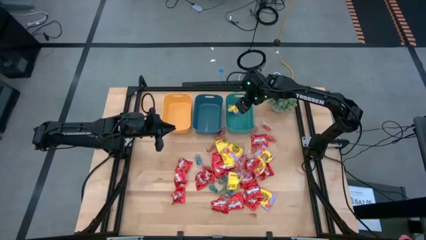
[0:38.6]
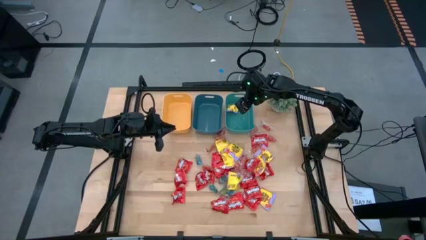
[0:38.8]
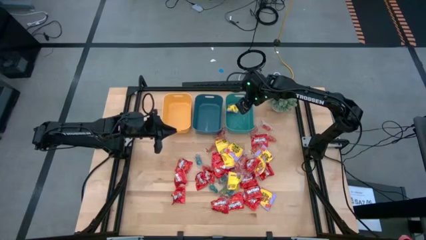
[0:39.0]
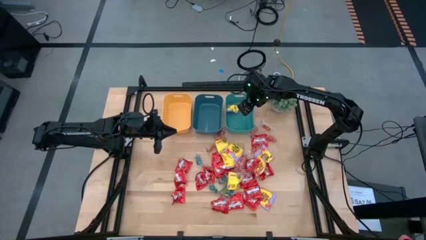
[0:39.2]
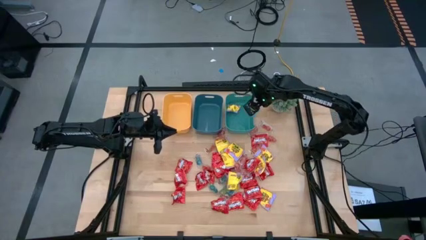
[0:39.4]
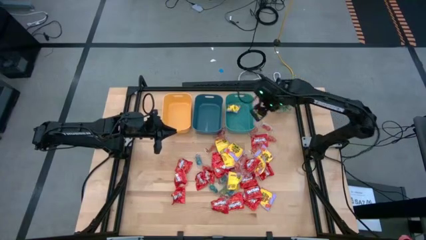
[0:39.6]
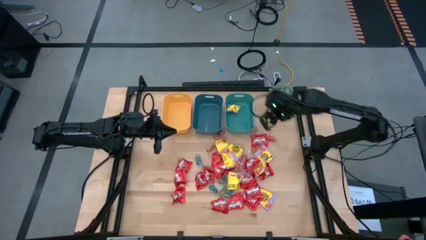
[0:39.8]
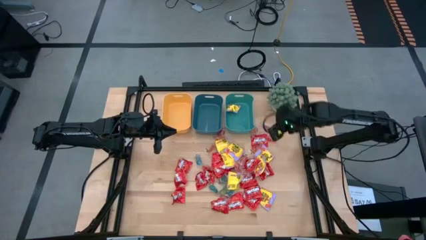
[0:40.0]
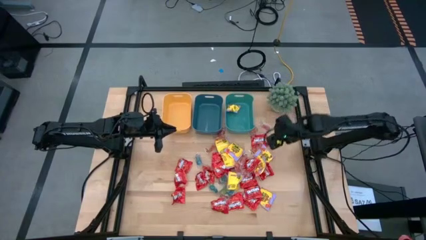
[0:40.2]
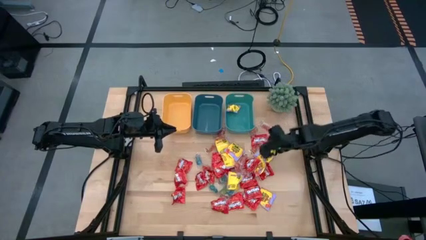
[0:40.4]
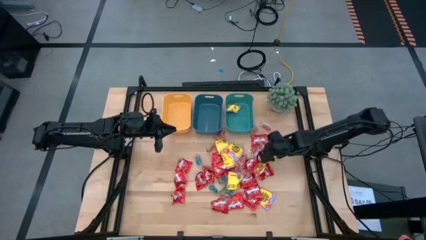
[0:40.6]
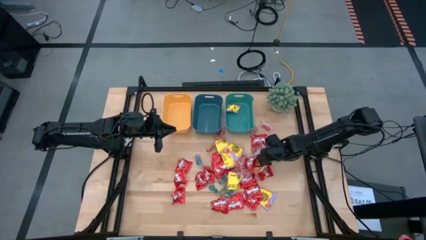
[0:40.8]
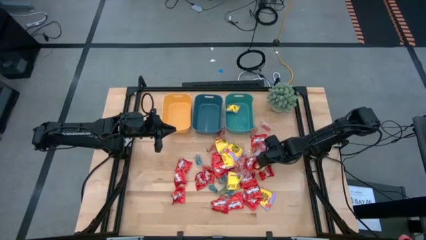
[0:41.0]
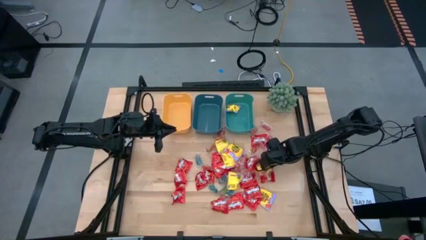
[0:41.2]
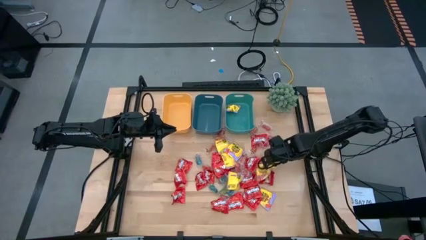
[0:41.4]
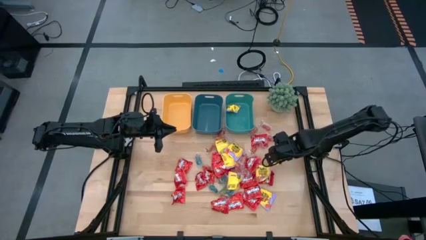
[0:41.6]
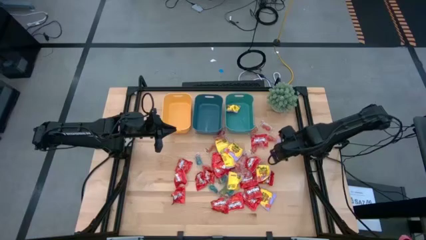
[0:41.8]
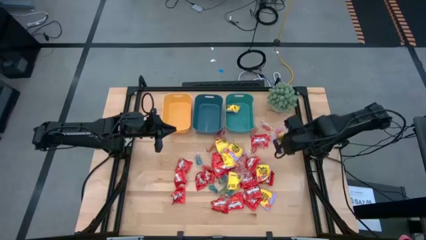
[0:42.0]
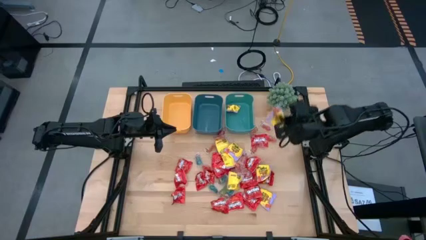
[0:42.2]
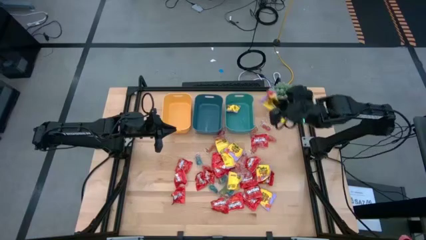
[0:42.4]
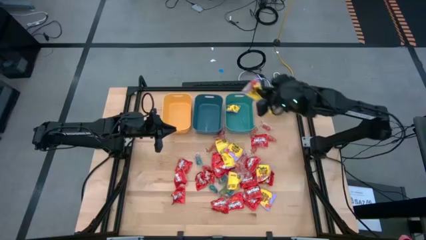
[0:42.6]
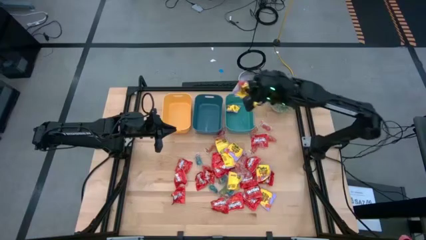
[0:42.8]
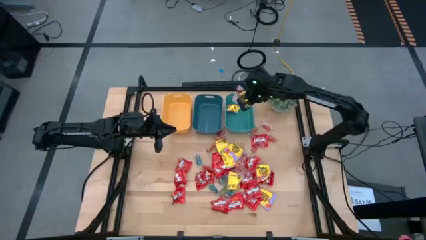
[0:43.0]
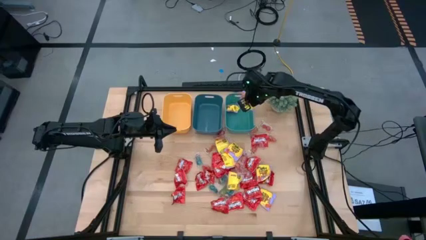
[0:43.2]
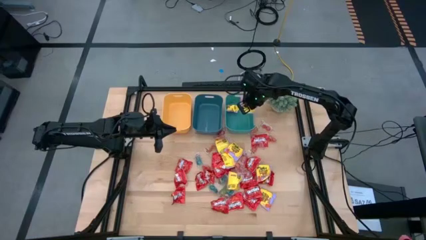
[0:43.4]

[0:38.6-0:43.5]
Task: Sort candy
Put the yellow candy into the green bin

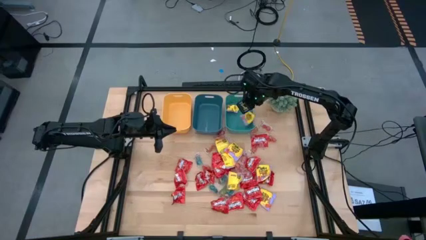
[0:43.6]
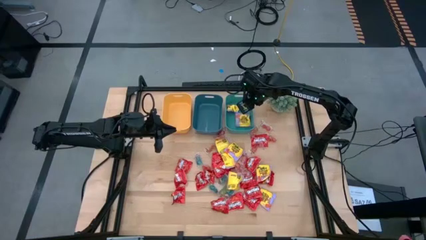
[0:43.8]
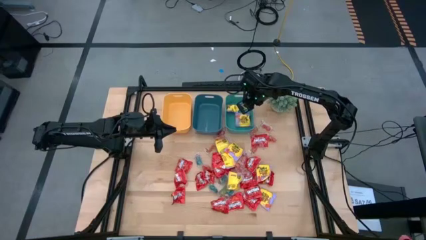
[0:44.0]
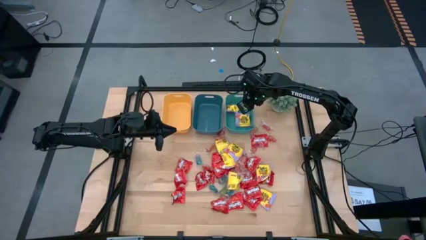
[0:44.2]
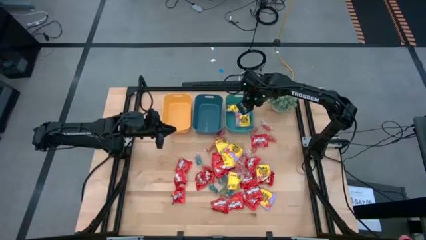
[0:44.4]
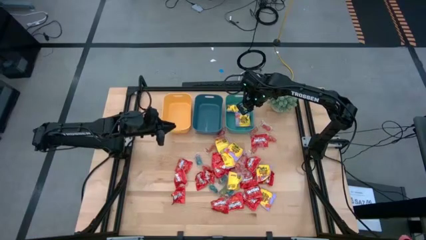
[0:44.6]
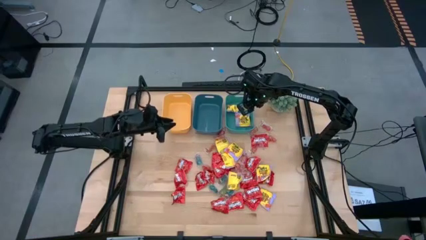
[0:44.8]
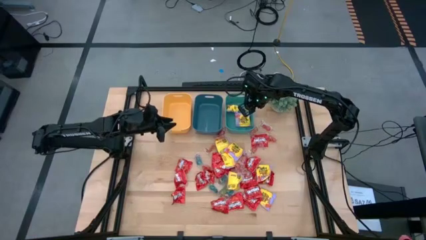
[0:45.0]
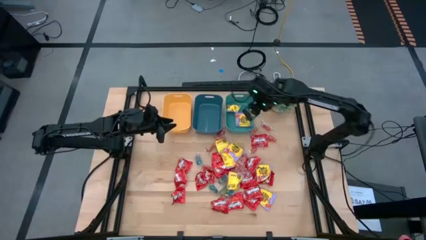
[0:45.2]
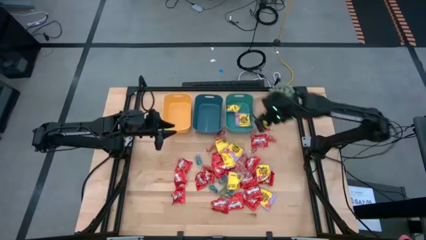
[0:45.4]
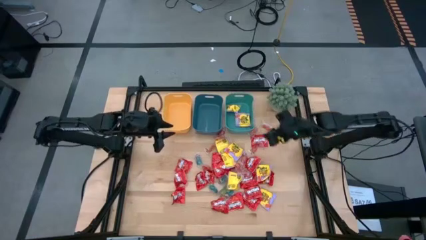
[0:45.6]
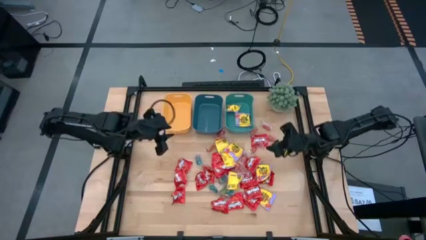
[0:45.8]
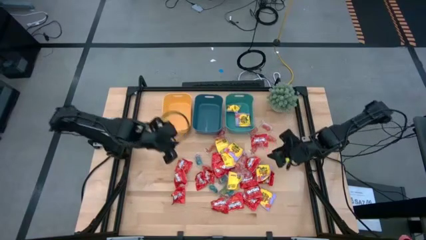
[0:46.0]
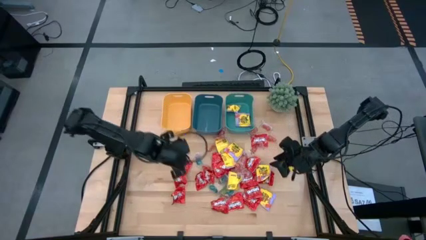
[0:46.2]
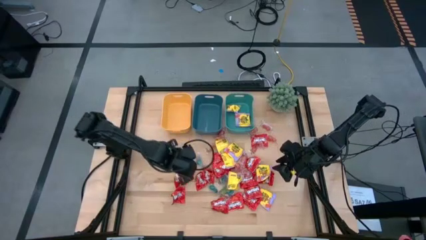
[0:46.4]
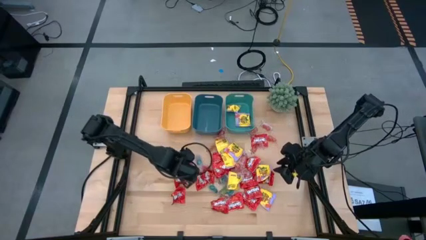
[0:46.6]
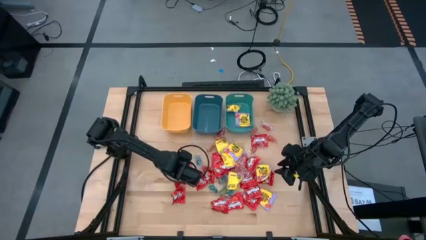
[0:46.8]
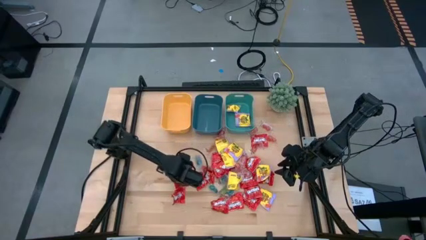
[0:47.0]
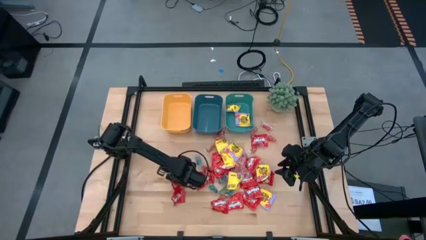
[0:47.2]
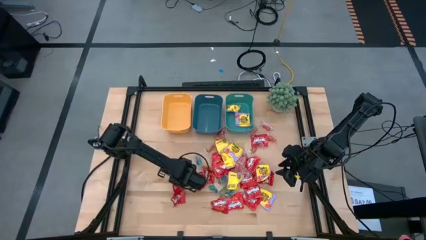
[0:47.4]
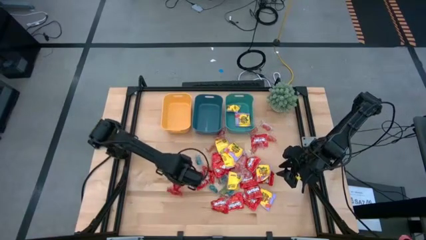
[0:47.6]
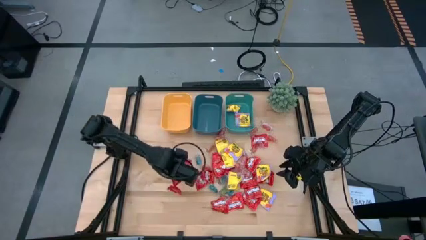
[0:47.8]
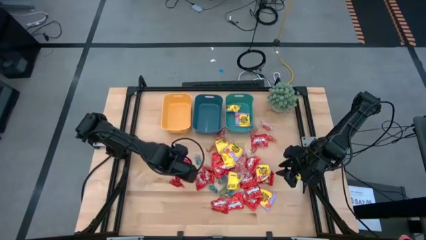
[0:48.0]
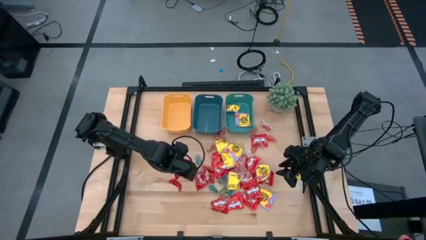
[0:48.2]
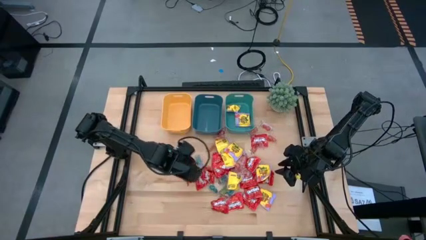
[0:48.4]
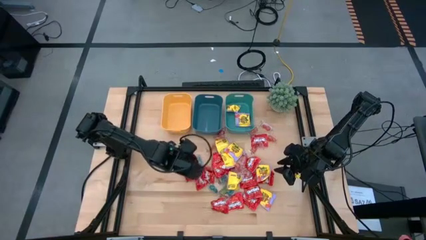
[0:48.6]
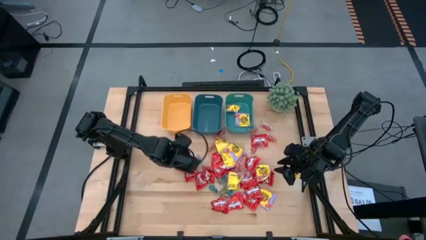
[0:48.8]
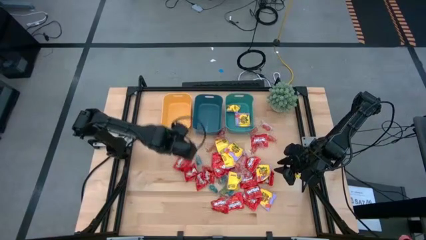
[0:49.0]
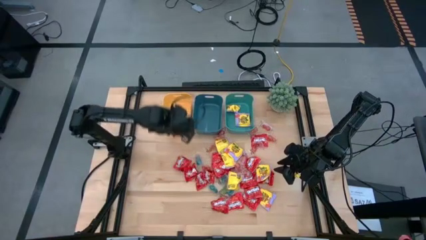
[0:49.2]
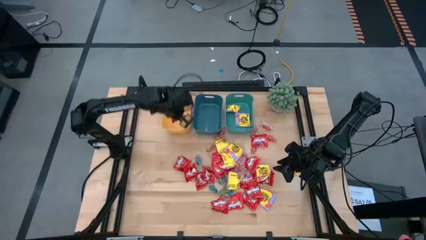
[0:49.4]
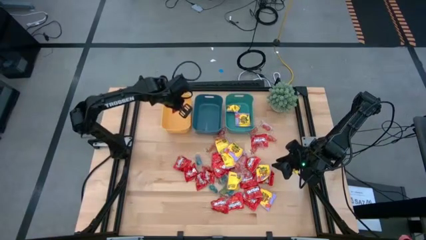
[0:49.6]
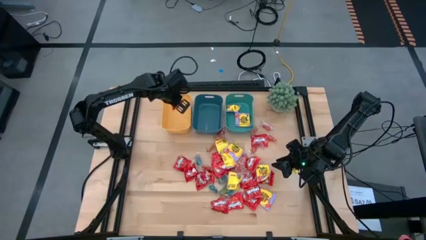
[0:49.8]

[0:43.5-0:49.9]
Put the red candy into the yellow bin

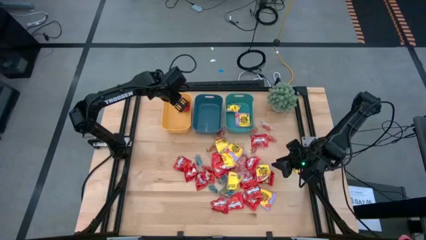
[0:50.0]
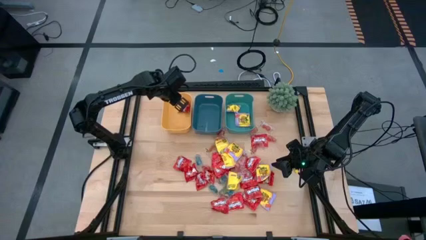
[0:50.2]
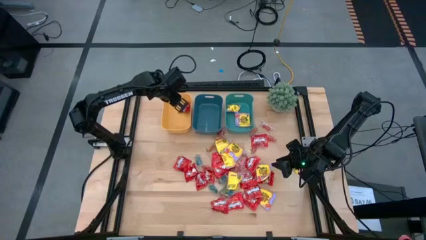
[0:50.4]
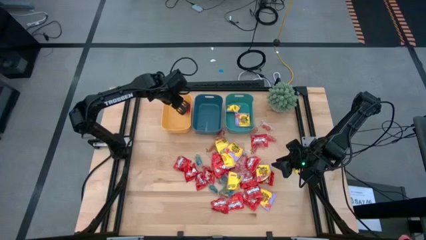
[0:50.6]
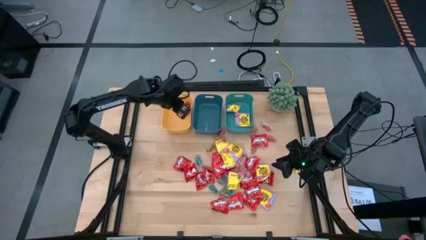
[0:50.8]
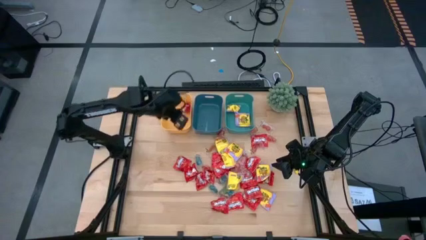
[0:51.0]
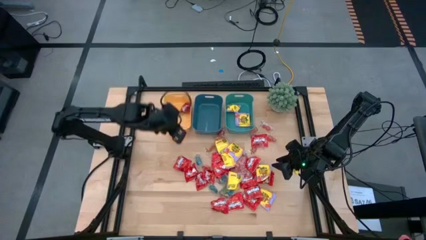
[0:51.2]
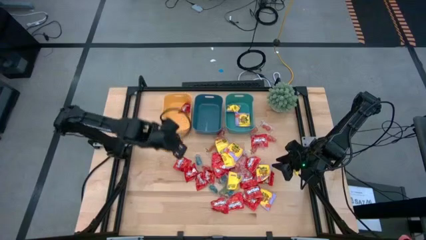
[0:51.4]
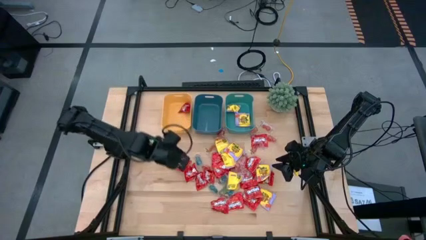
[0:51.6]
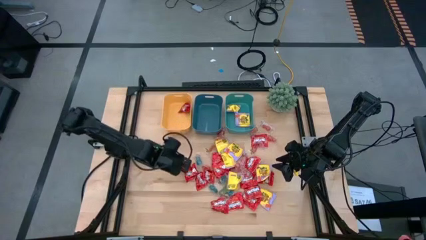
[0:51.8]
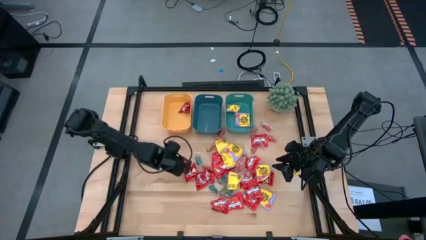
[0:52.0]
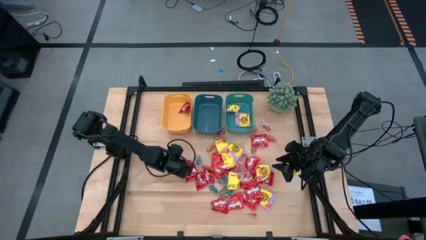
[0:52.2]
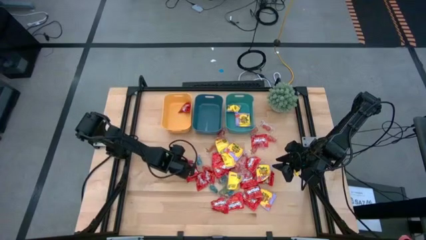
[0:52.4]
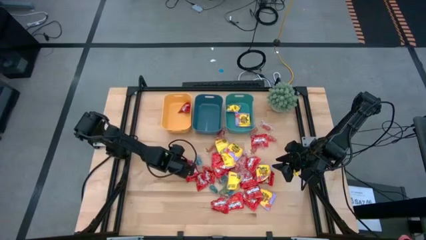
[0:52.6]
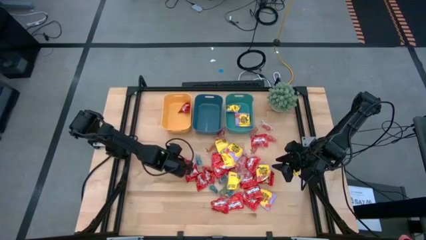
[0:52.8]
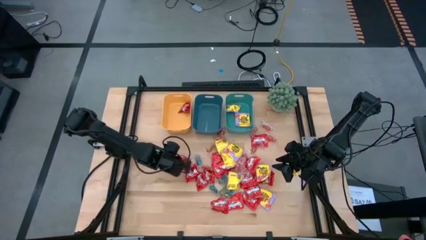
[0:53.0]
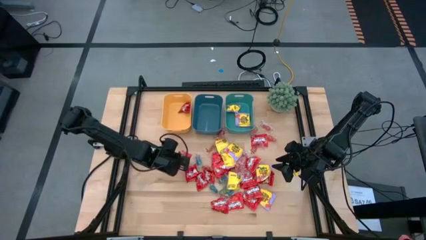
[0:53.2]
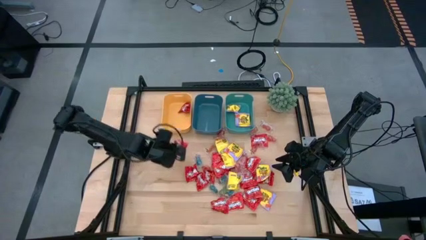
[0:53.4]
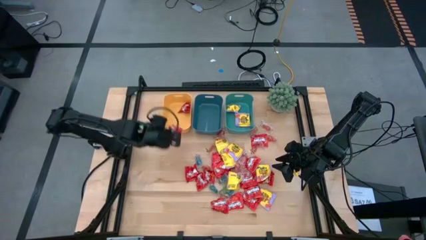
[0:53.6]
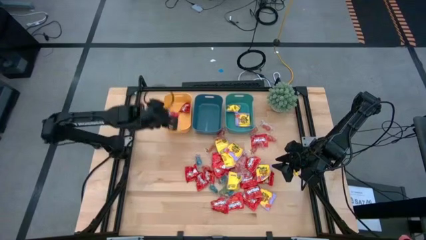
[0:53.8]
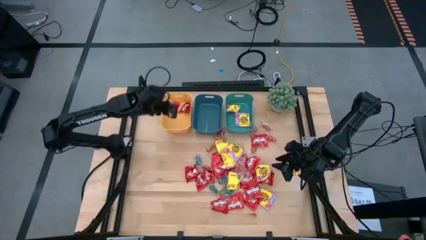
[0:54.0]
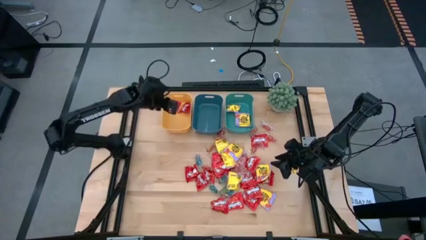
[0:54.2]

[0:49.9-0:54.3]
Put the red candy into the yellow bin

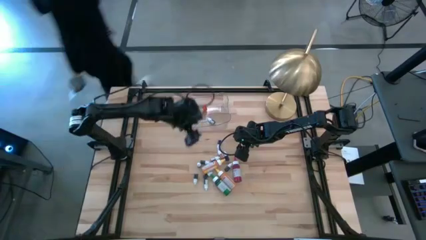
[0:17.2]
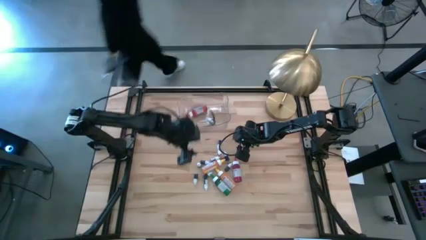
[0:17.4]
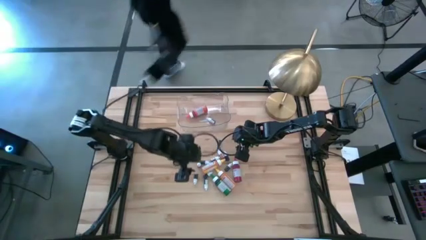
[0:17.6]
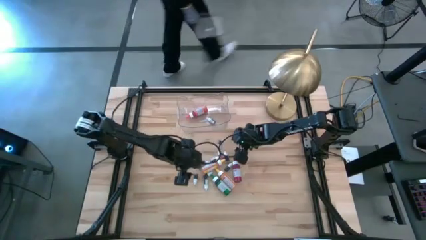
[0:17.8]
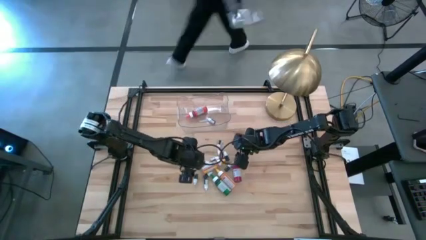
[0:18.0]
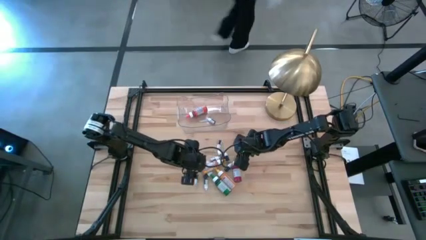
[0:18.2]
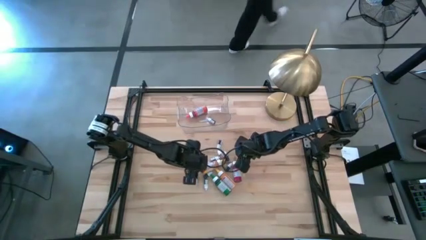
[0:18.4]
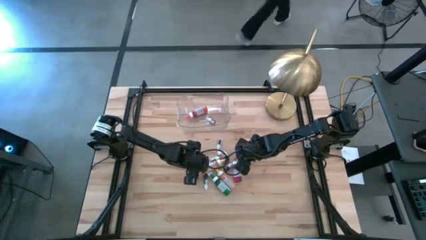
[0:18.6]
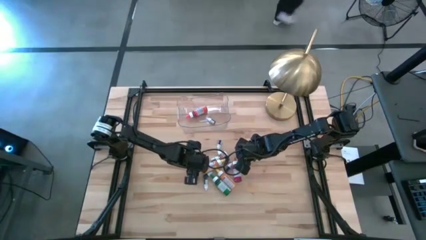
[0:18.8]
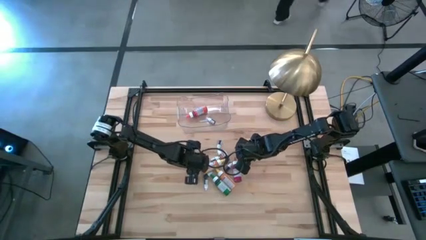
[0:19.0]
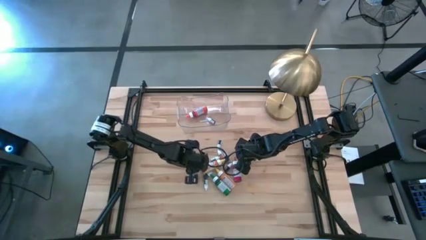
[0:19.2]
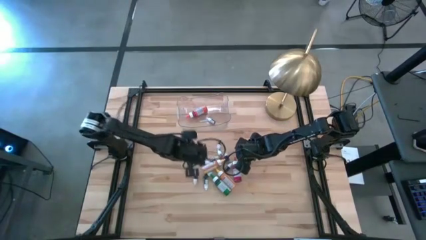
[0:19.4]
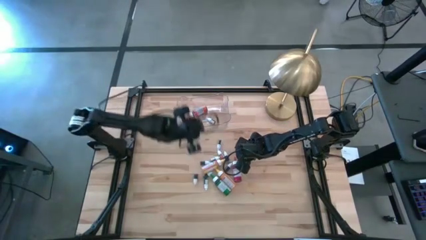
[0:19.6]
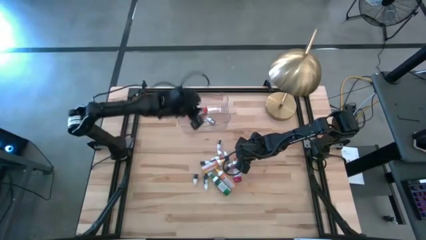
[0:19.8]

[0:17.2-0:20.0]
Task: Pick & Place food coloring
Put the small red food coloring bottle into the transparent bin
